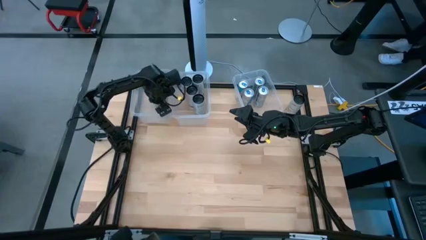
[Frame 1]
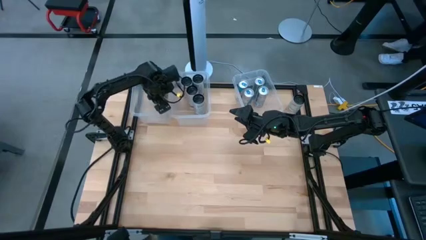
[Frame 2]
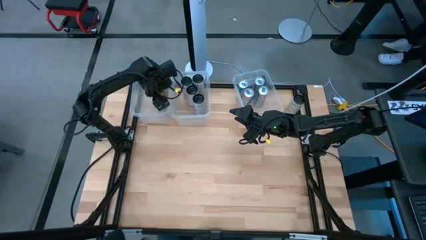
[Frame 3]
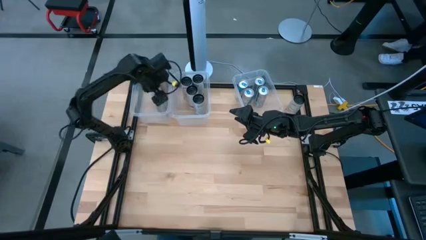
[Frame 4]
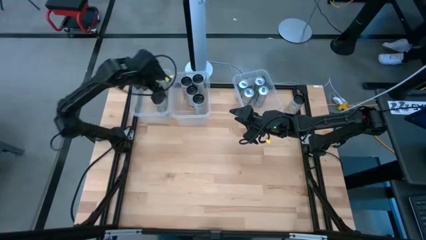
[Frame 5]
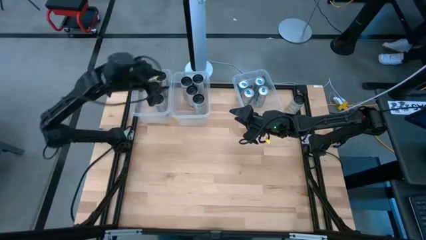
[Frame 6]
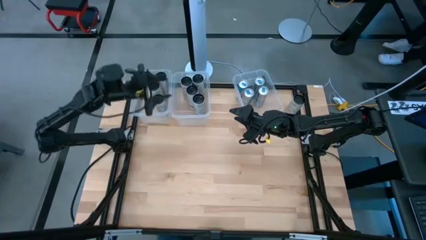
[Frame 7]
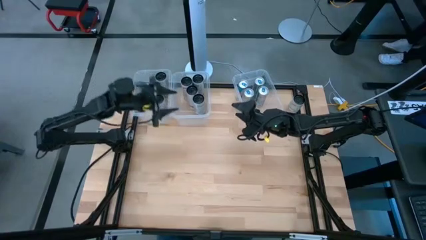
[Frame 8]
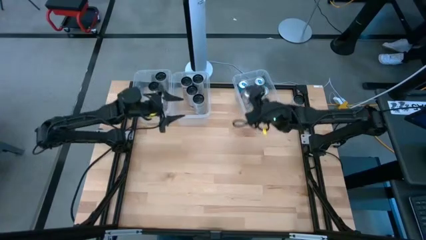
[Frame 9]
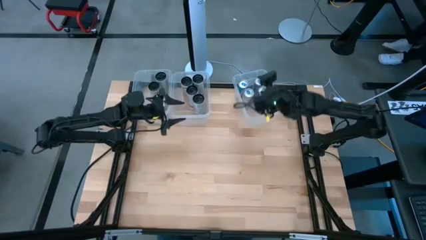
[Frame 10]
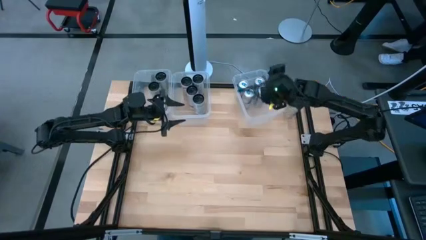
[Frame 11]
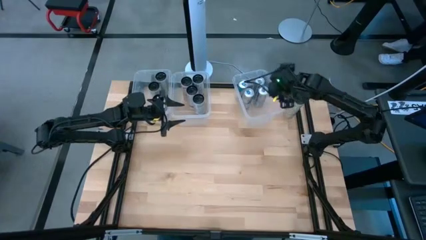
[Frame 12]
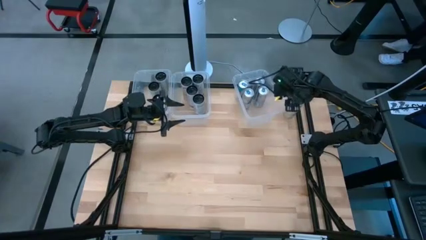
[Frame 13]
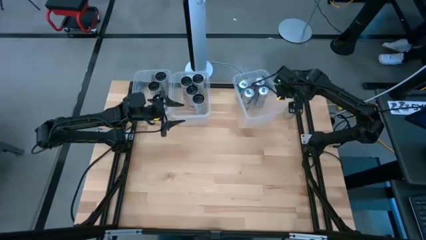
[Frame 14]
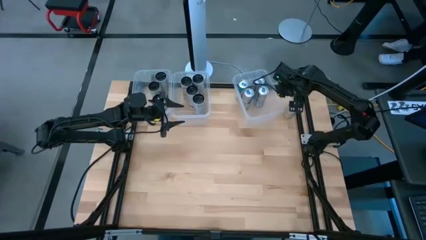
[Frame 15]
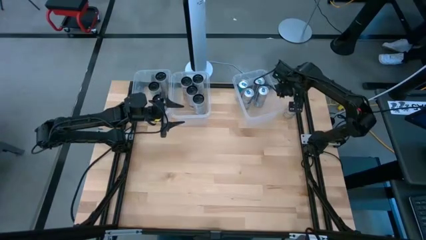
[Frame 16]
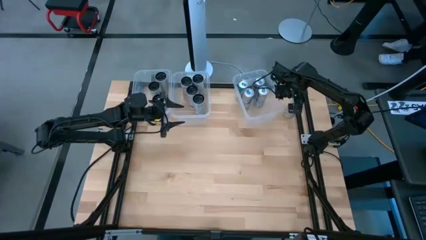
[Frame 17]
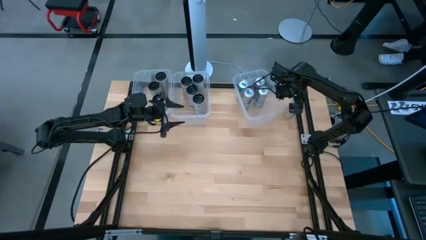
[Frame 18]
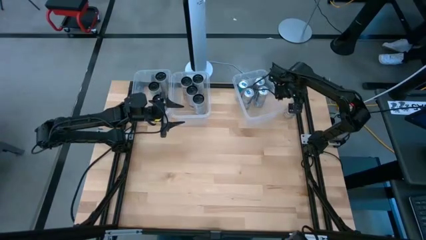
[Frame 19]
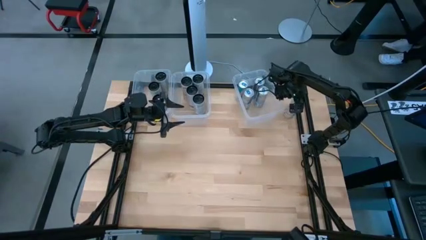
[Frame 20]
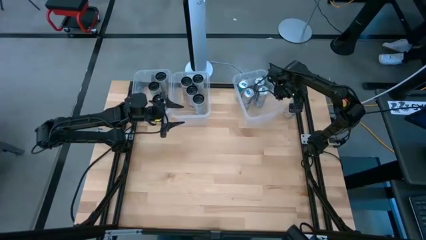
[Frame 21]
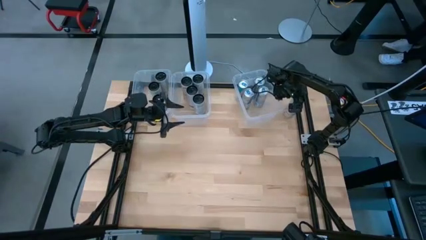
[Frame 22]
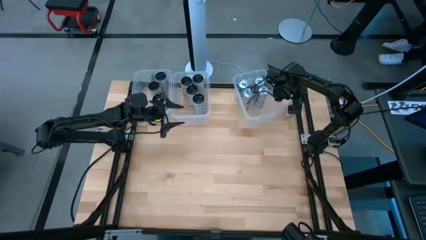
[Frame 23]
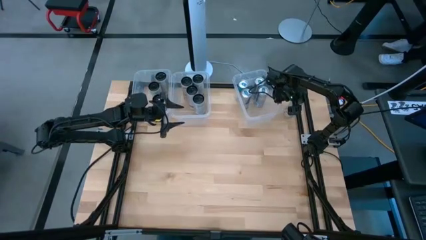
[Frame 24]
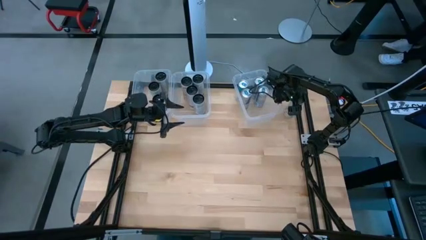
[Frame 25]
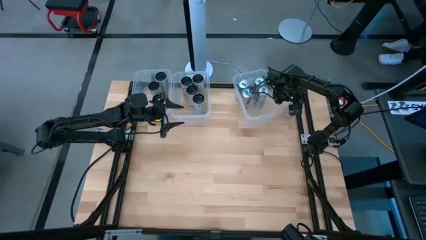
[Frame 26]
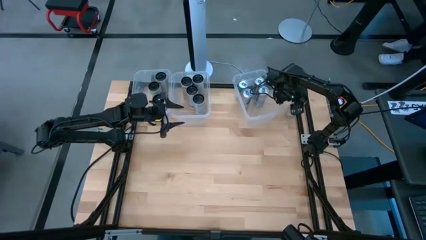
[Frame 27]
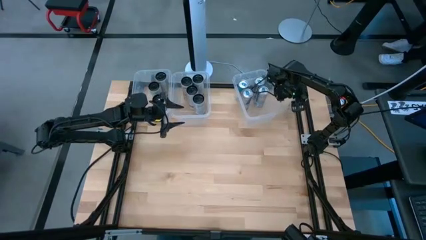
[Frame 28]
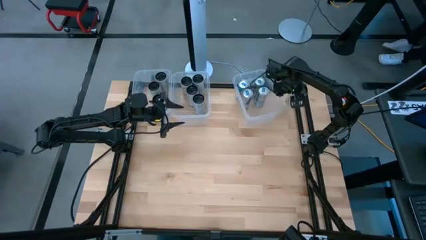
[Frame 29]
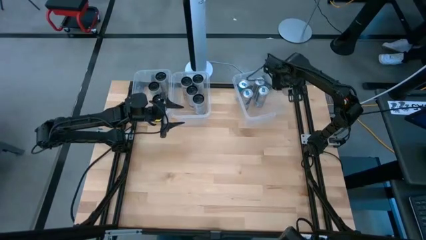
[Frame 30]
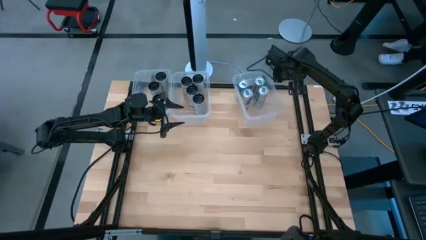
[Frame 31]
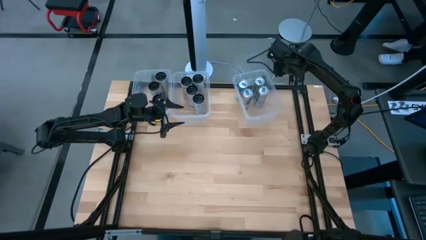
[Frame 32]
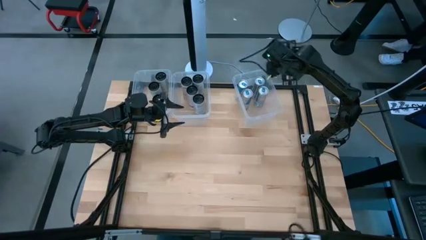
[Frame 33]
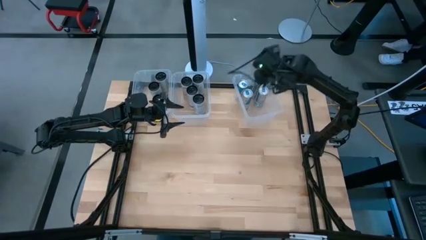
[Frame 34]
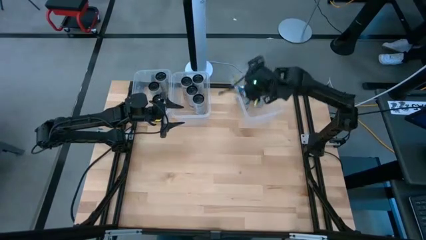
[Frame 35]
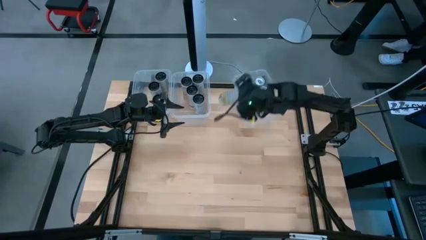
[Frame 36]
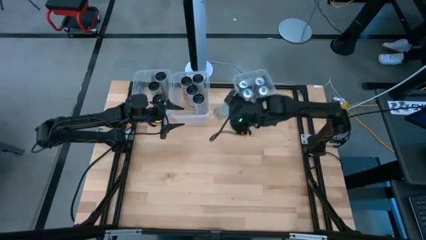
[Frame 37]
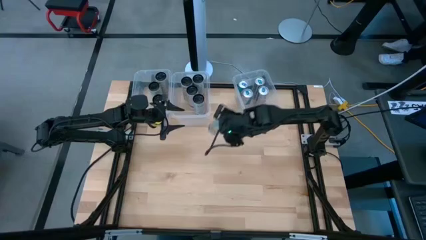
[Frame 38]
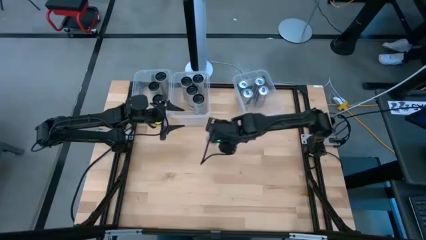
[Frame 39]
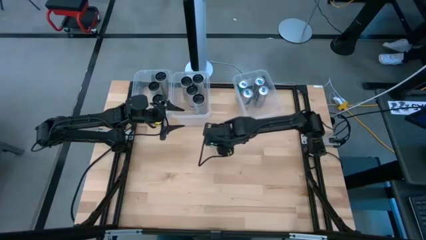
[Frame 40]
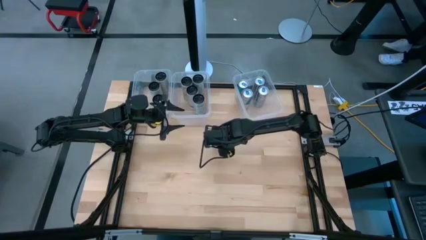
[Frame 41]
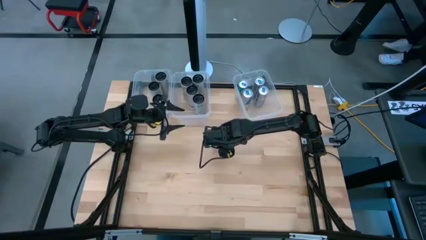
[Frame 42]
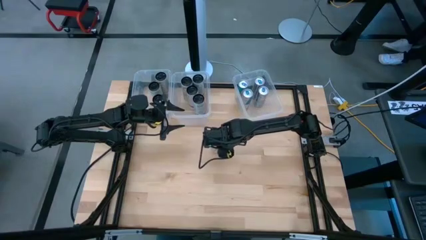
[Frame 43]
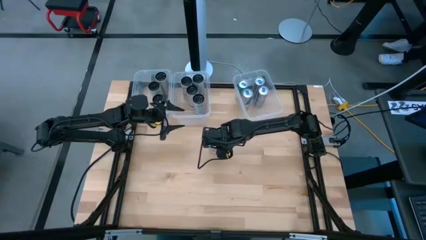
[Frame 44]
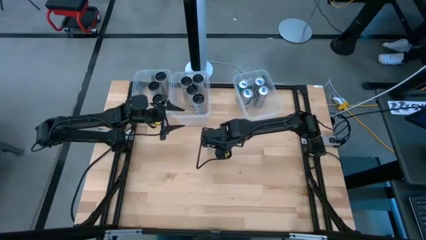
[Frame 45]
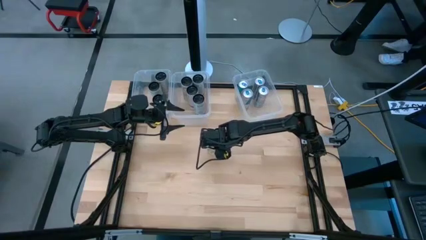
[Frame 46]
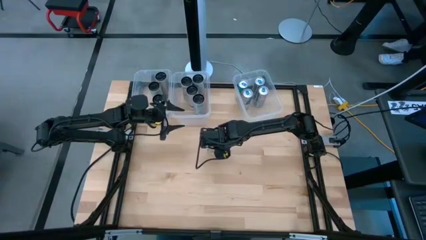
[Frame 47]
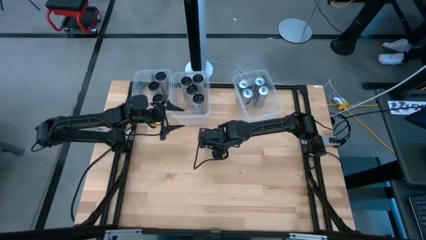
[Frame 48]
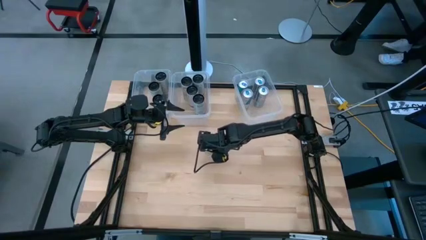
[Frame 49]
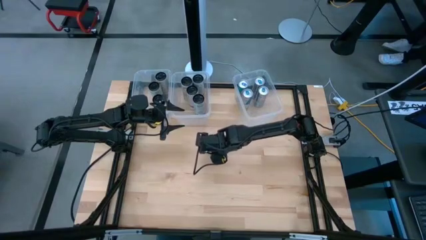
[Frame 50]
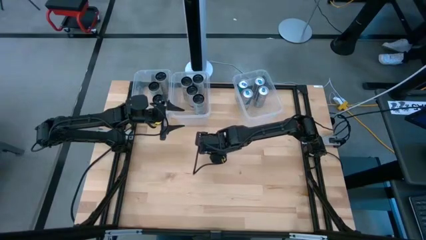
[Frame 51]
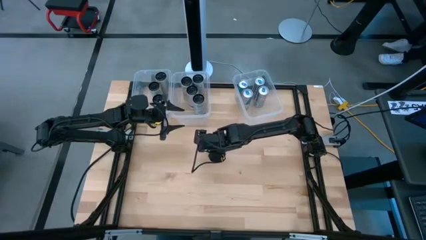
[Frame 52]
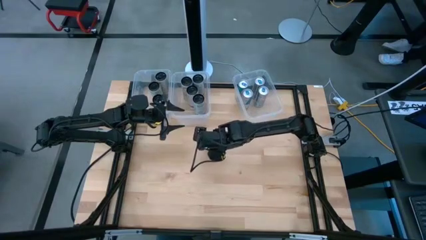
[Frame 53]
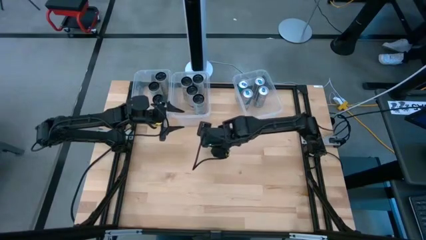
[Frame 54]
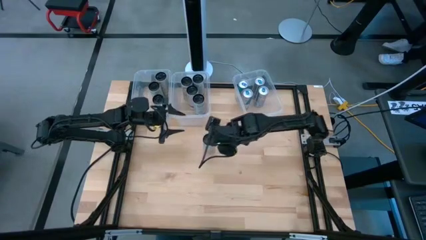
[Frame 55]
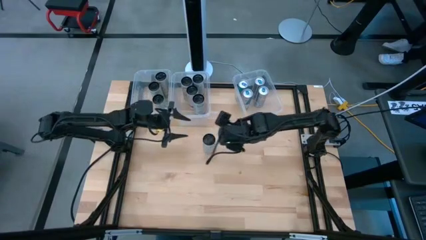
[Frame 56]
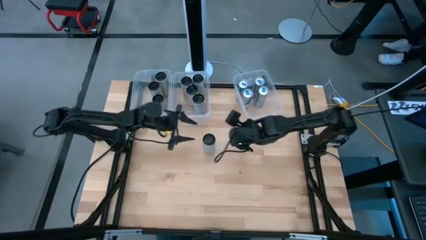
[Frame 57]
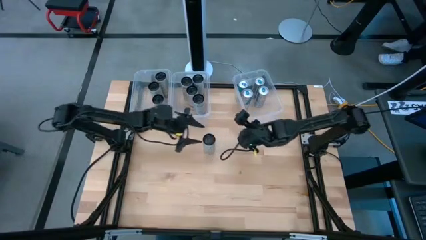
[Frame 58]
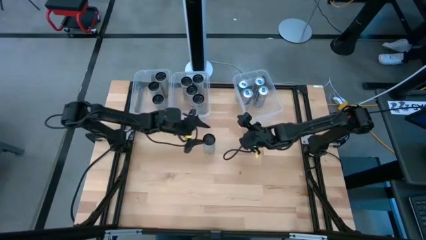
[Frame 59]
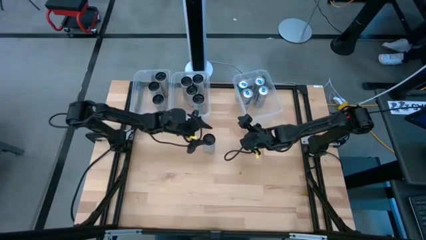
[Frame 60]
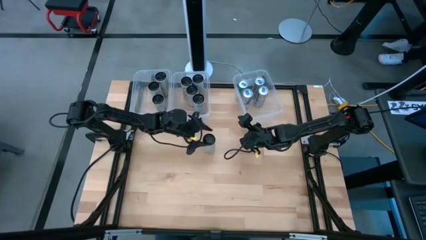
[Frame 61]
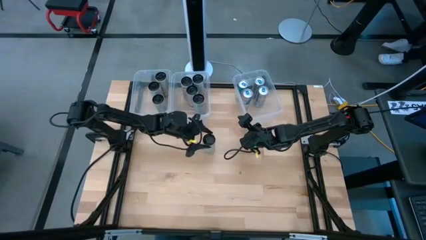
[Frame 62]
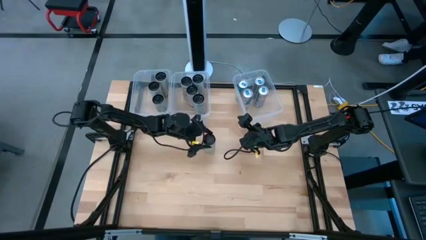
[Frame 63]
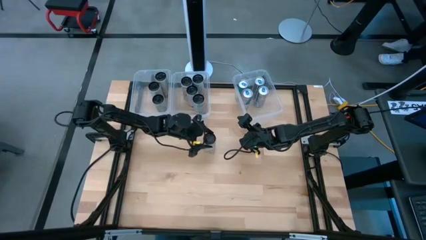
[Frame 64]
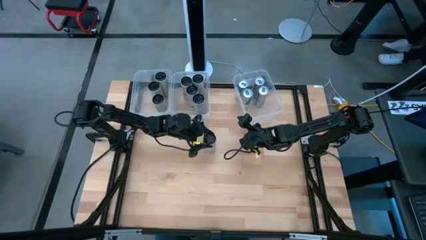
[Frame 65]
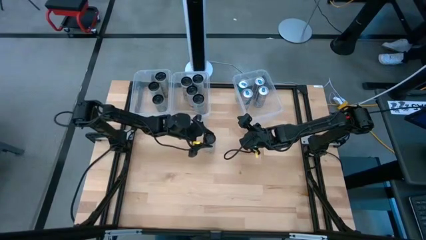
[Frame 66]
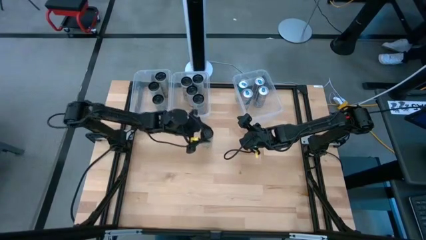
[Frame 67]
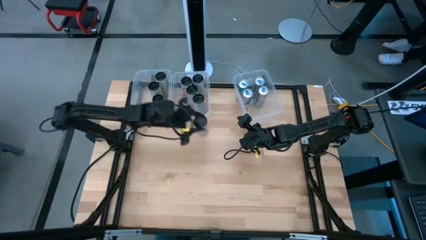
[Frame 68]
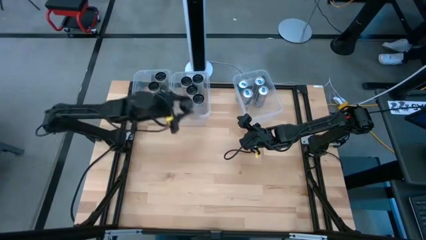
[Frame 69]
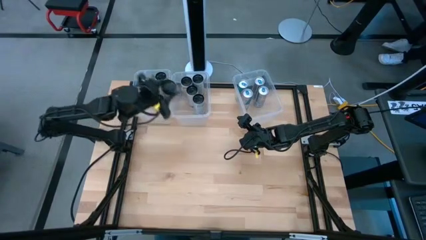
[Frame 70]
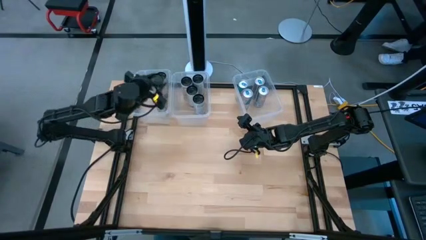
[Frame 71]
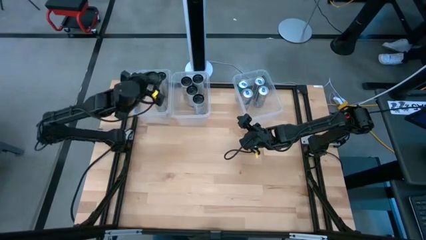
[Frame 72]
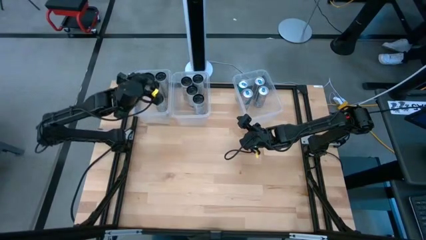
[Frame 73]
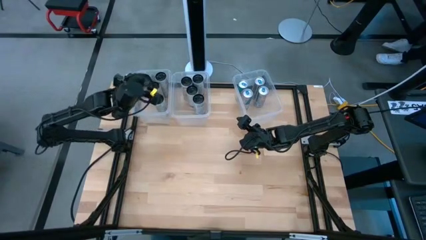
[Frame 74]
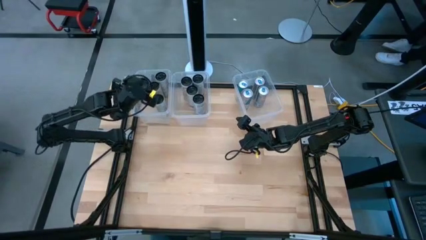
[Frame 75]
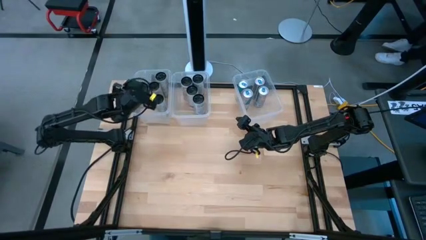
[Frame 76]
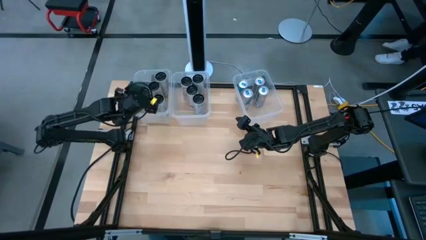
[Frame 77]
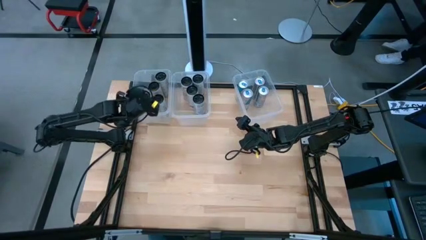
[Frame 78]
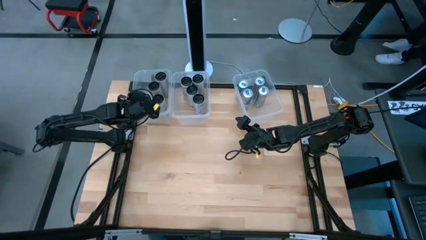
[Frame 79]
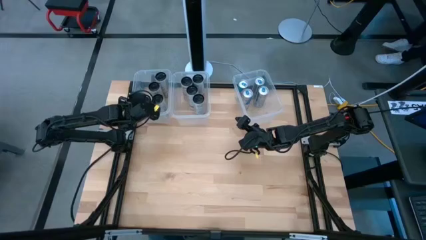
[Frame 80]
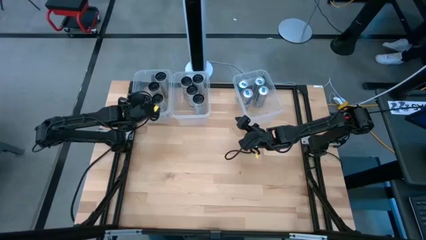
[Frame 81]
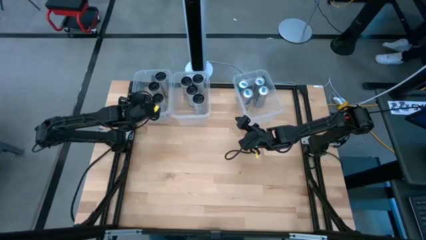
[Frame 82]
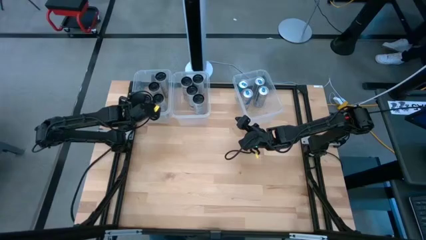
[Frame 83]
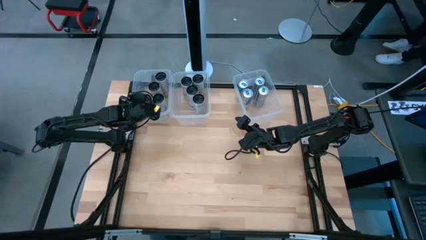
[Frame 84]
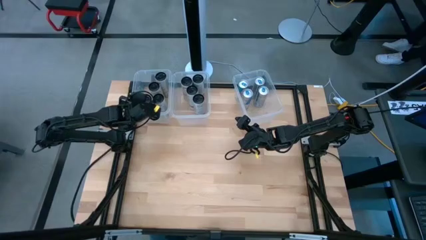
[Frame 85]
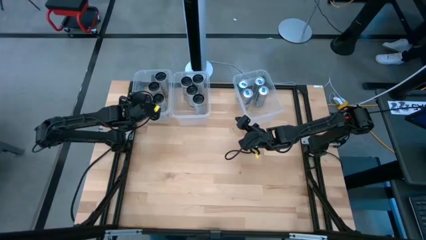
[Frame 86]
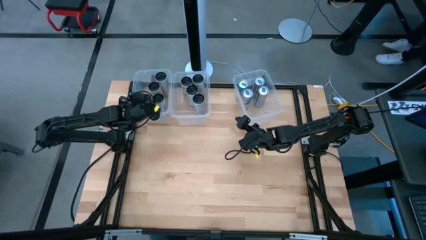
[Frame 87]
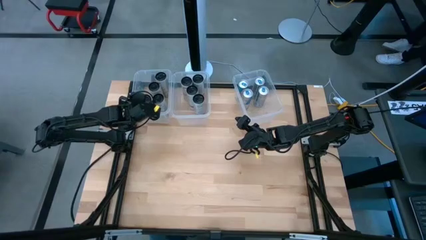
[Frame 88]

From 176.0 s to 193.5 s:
Task: Sort soda cans
Put the white-yellow soda can into the top left transparent bin
